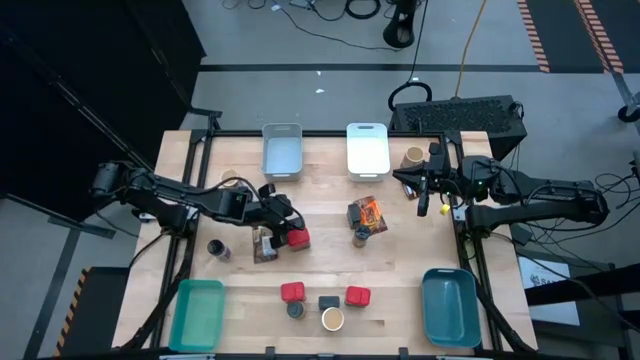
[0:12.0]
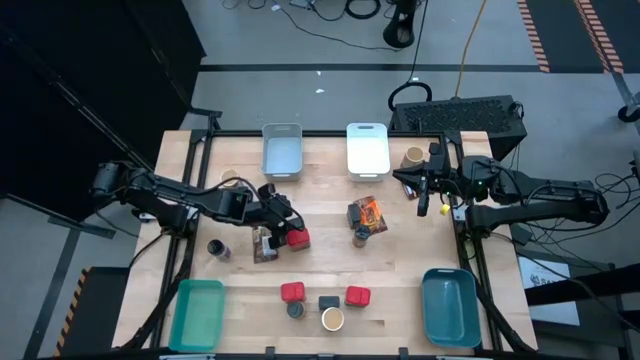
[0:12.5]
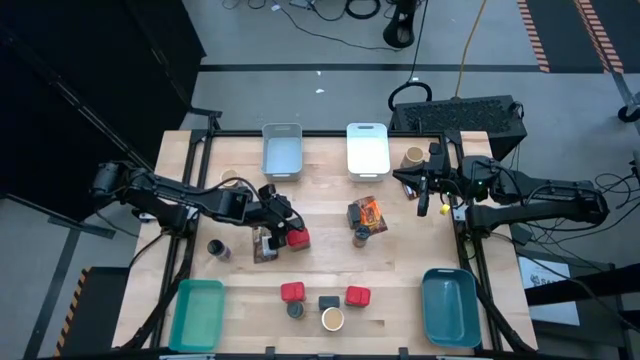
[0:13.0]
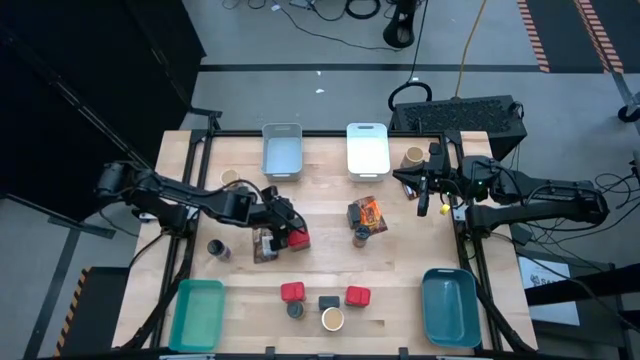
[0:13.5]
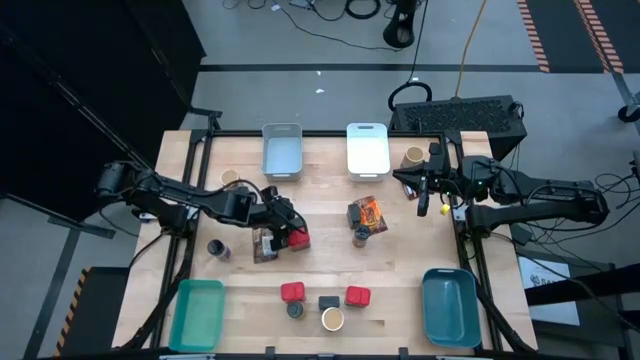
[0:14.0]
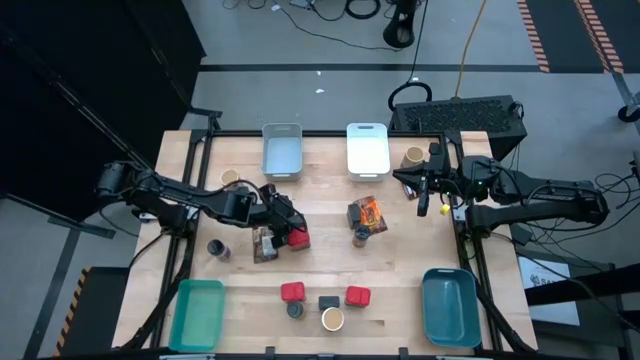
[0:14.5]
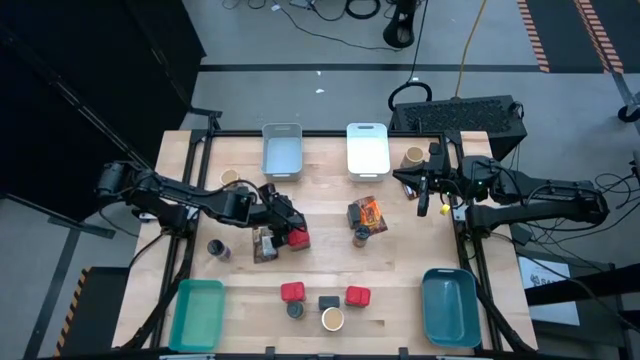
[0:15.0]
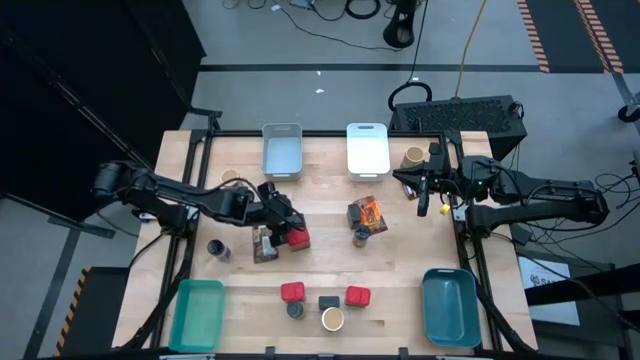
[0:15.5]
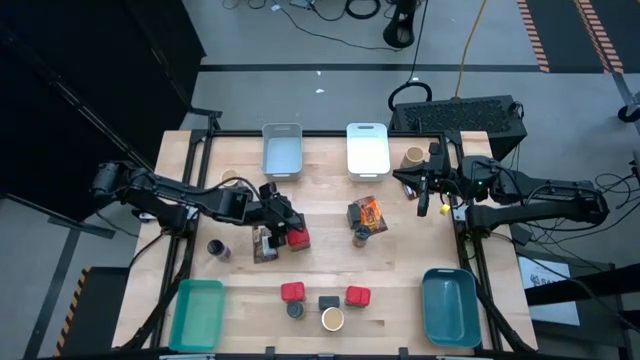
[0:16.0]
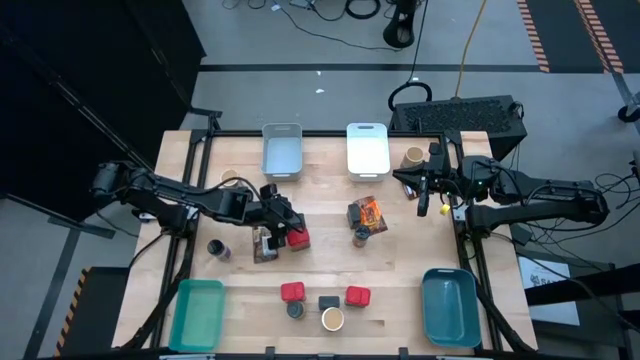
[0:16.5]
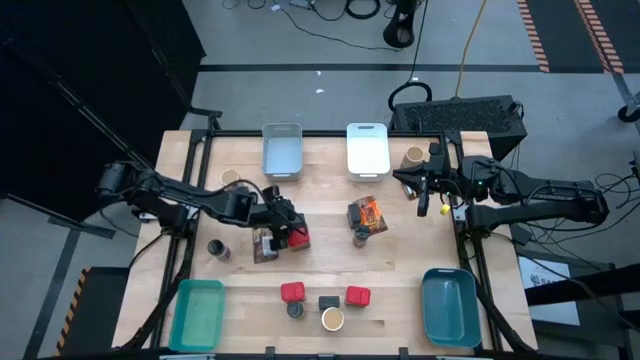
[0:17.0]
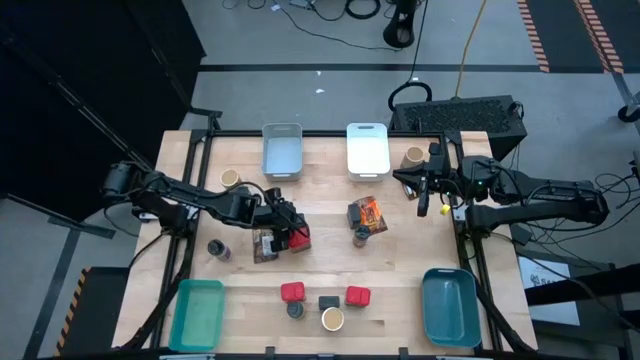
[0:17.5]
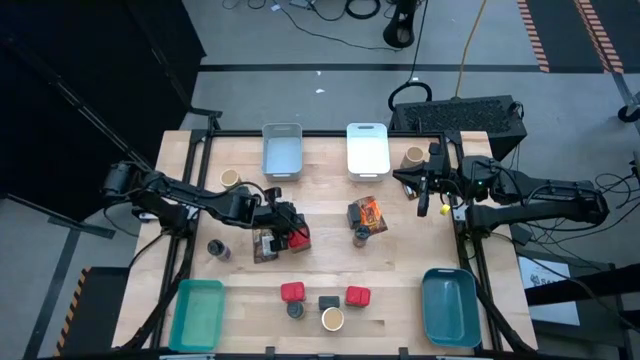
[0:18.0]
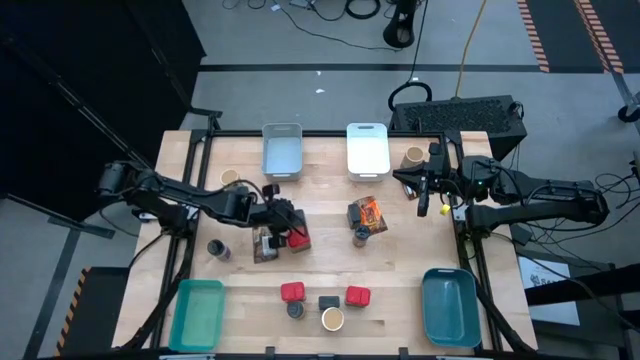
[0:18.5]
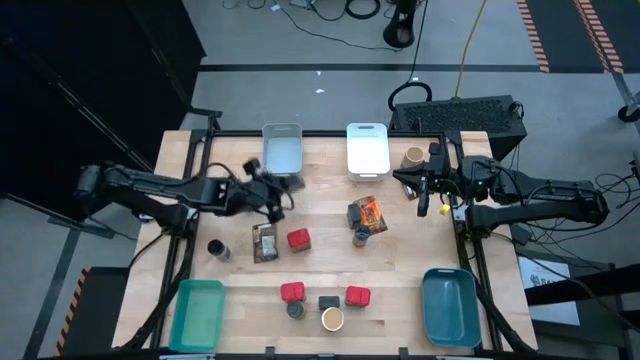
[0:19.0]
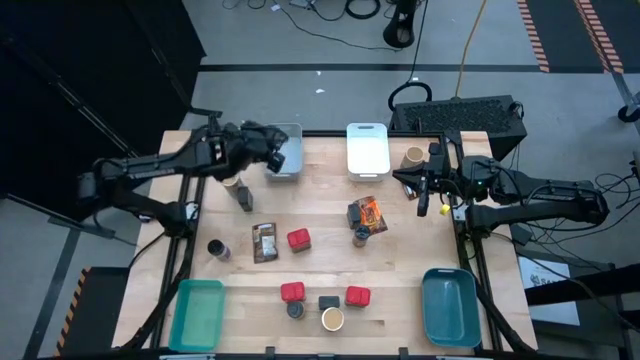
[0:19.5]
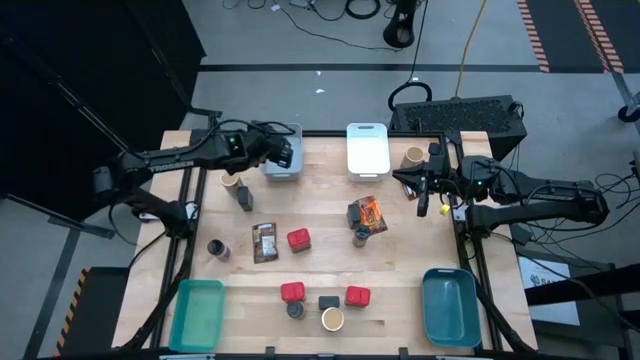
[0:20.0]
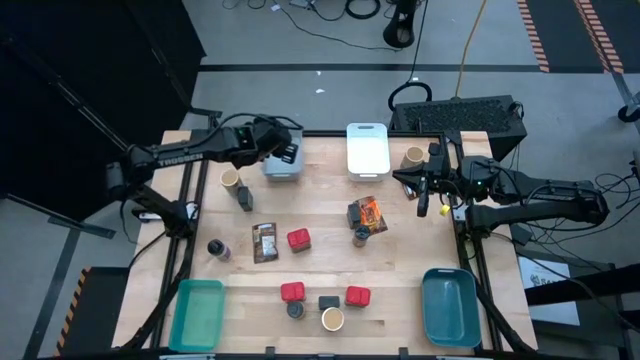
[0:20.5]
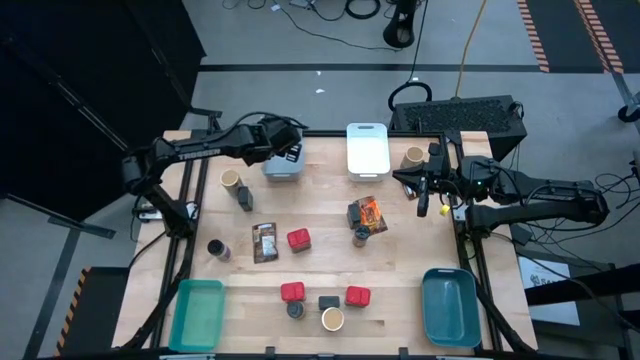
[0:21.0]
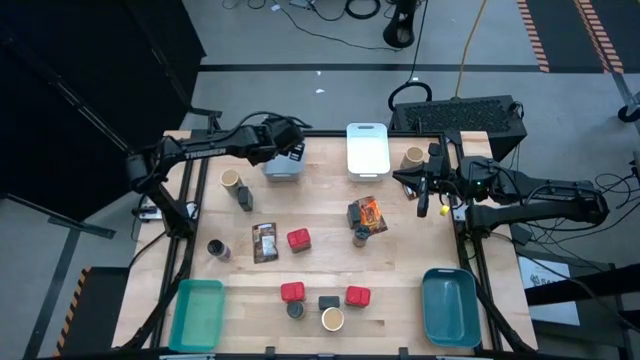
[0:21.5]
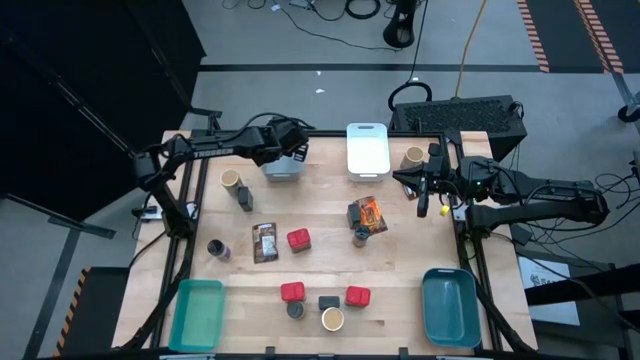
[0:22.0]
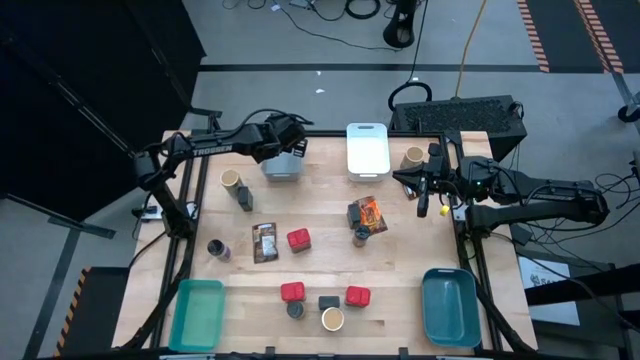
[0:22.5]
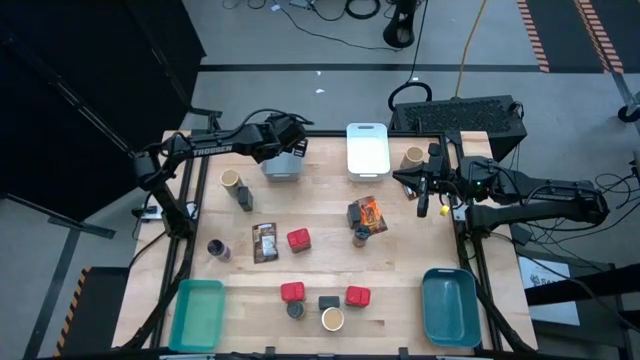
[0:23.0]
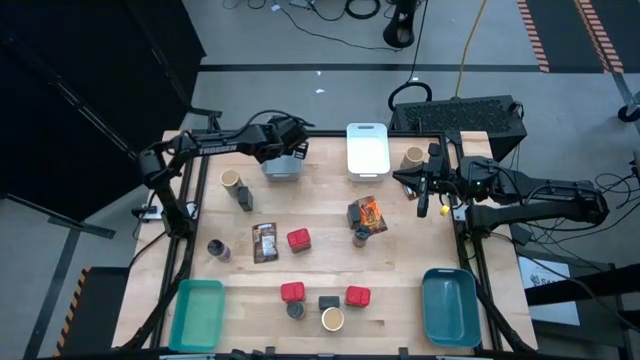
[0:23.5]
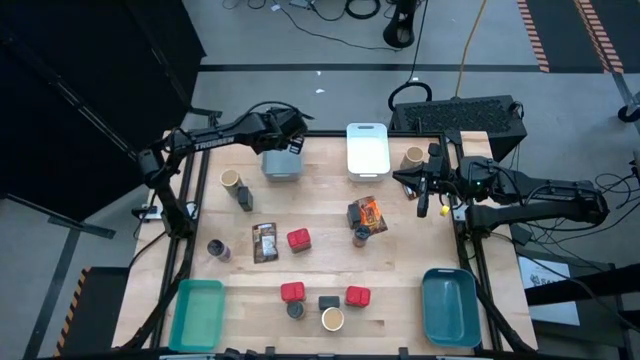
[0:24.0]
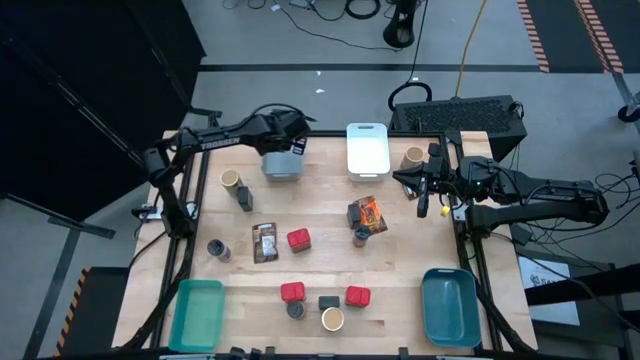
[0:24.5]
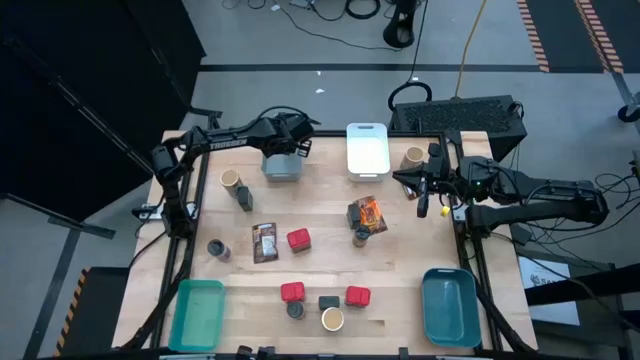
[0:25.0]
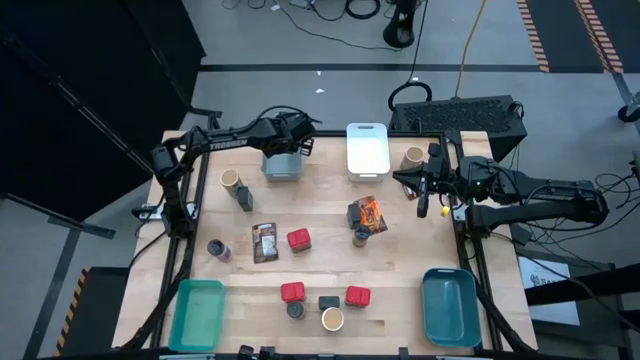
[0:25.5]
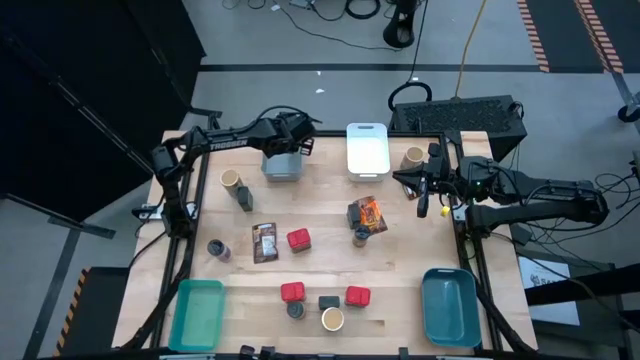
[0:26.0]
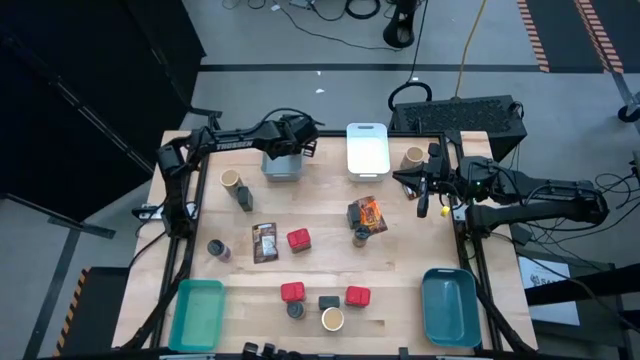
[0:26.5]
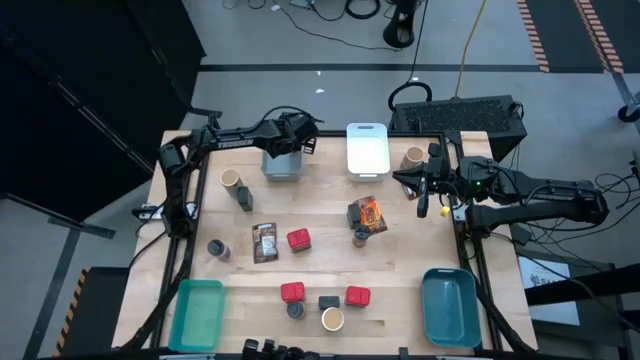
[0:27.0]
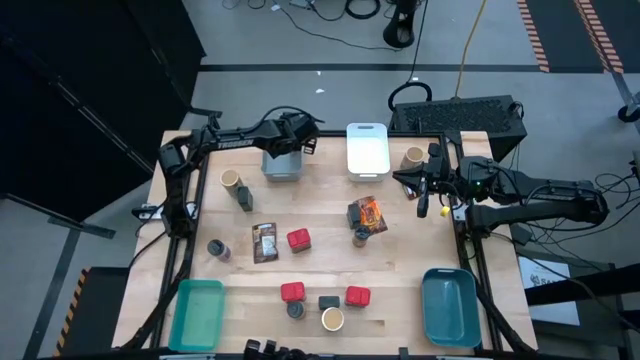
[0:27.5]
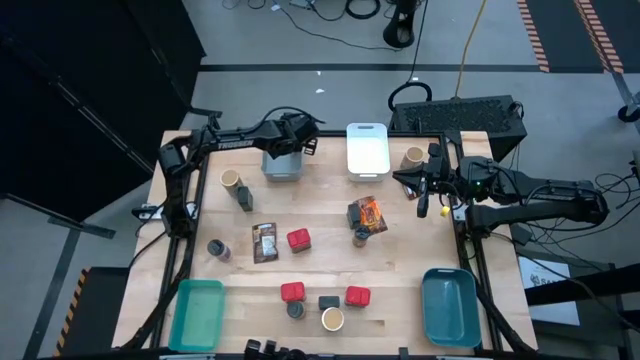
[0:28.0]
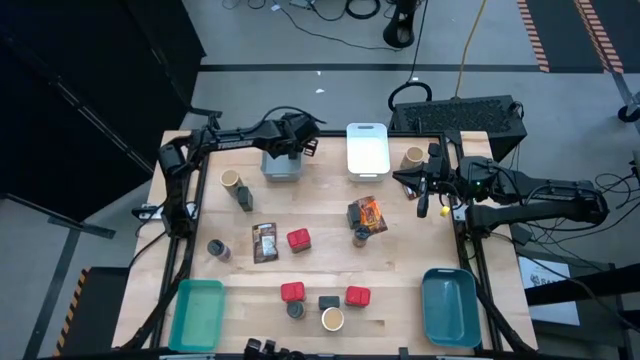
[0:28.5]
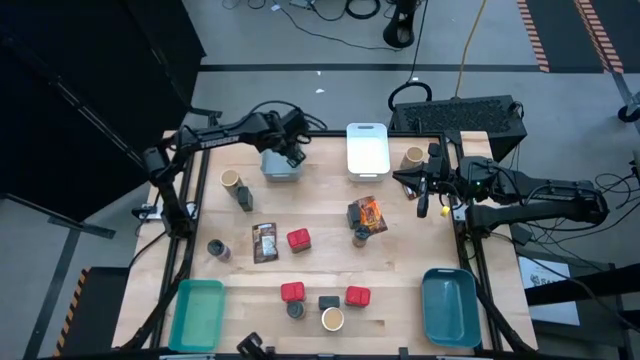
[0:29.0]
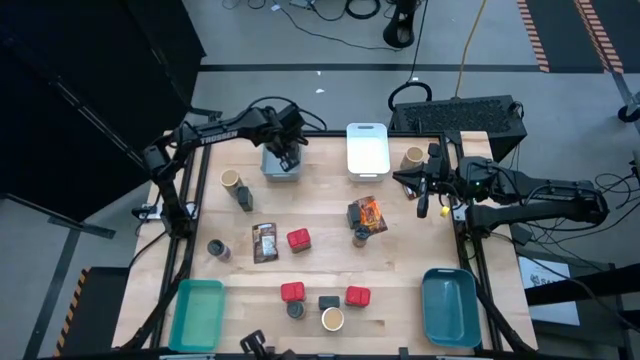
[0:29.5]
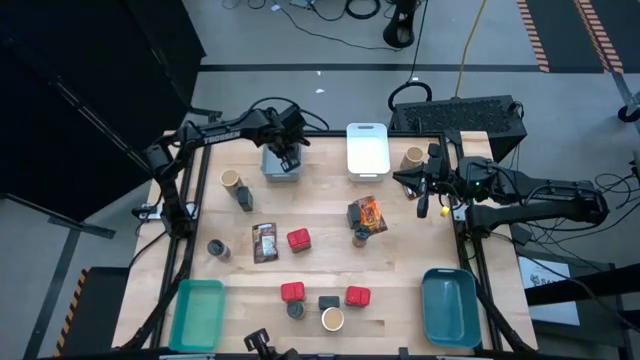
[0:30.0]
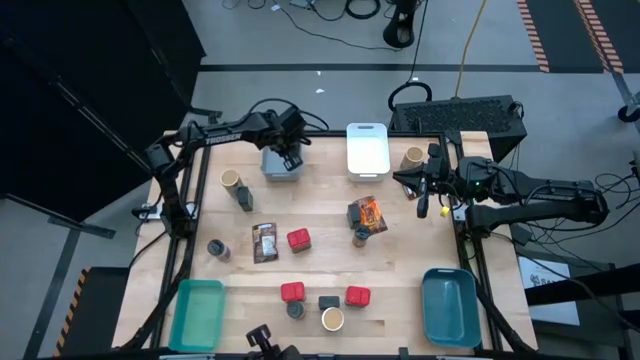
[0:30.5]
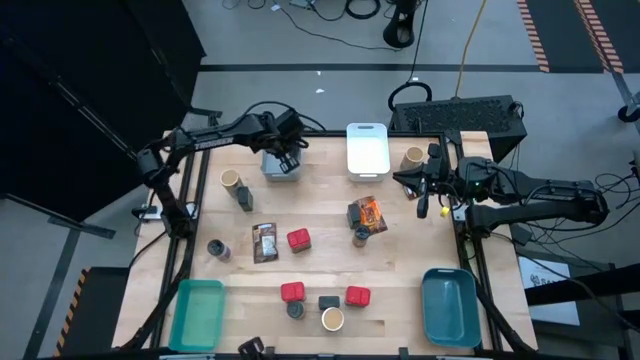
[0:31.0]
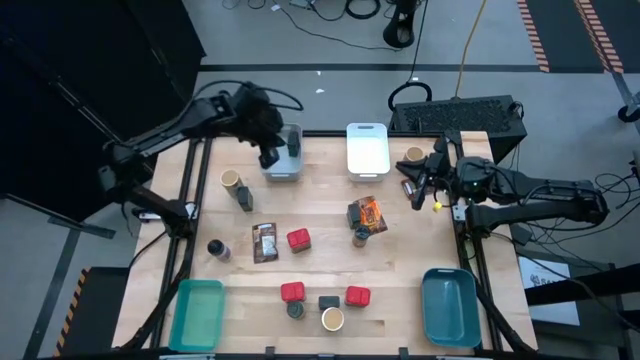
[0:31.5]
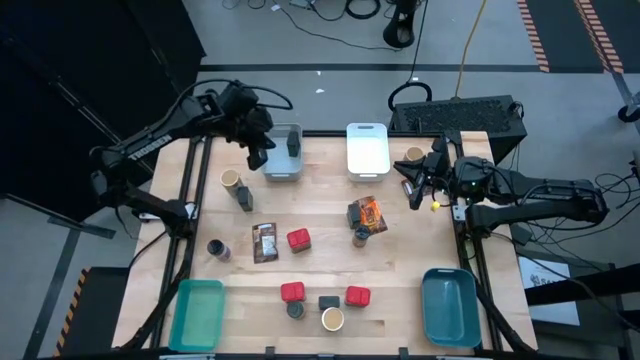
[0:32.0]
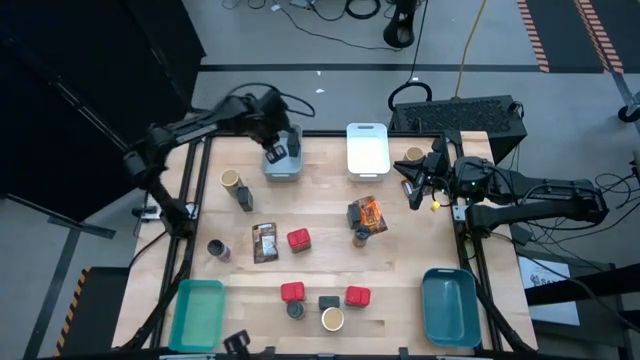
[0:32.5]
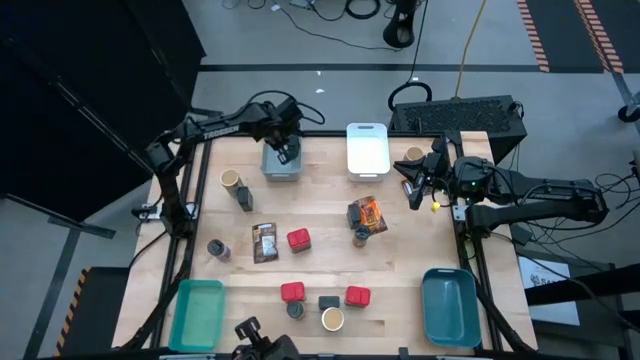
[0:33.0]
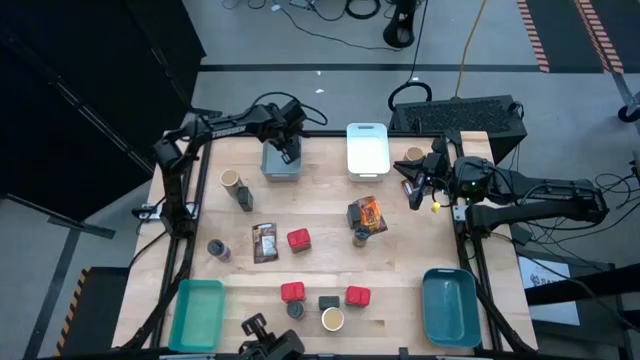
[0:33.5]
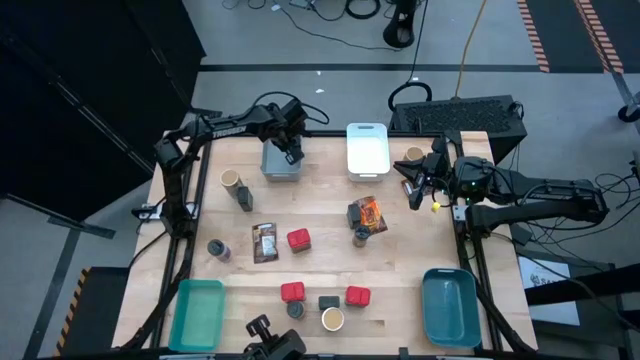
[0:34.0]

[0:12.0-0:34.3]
Task: Sort spices by type
Put the black spice can into the gray bin
